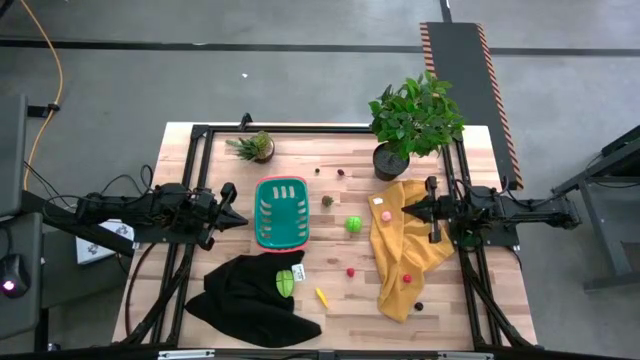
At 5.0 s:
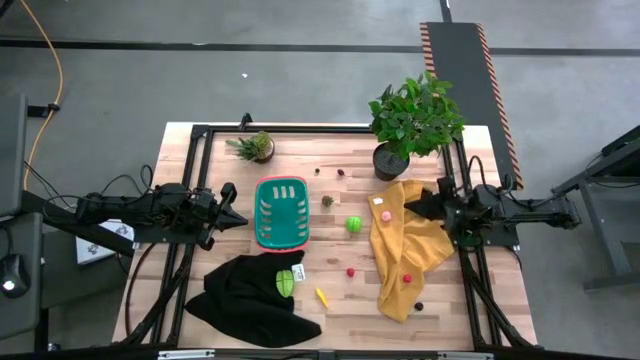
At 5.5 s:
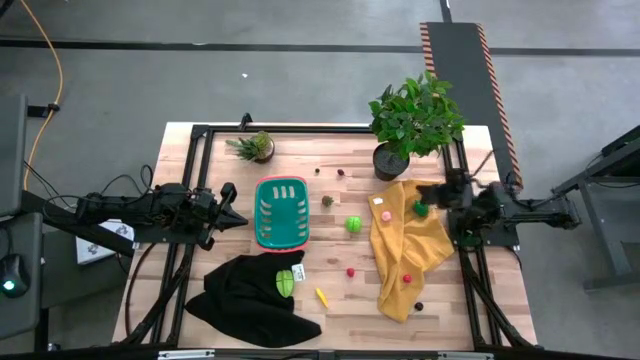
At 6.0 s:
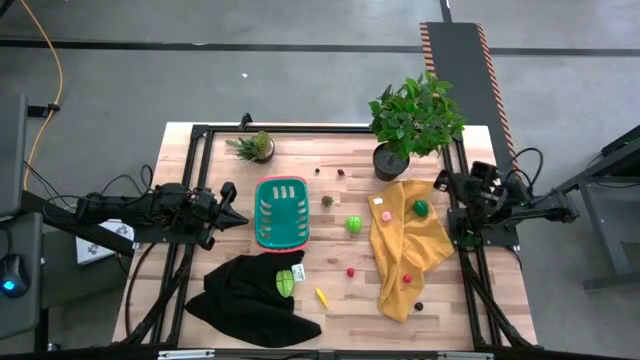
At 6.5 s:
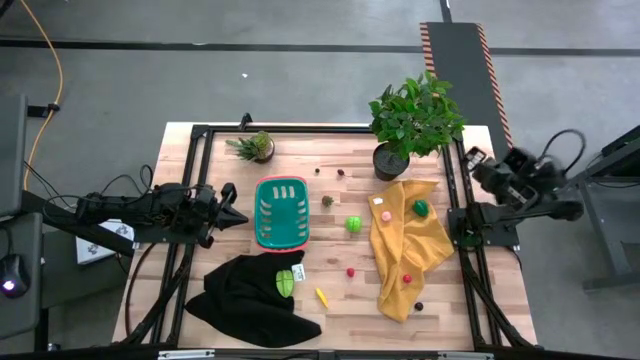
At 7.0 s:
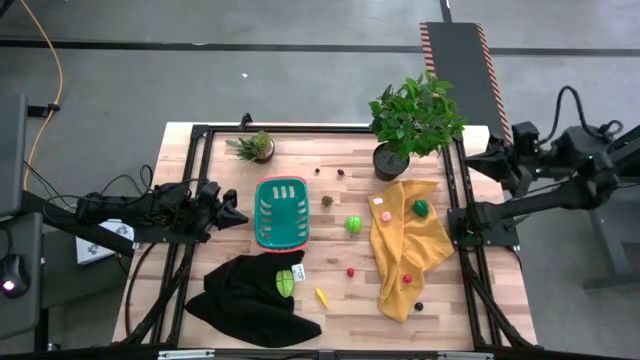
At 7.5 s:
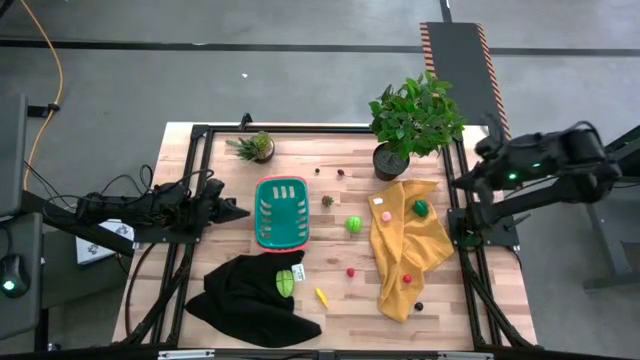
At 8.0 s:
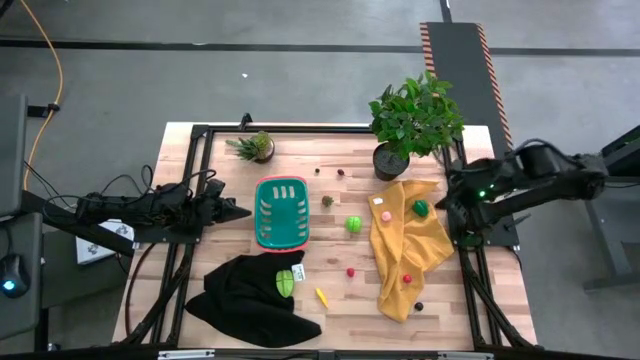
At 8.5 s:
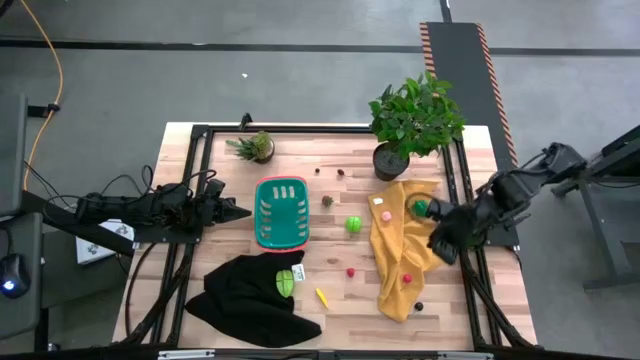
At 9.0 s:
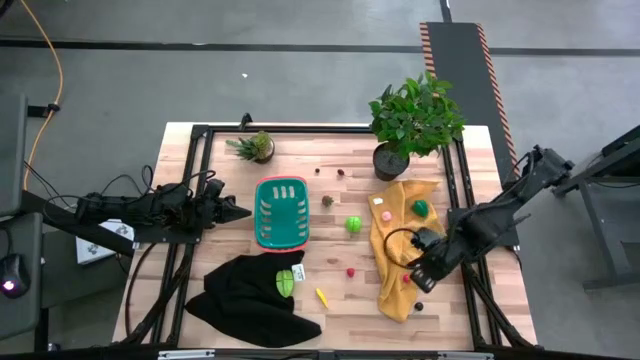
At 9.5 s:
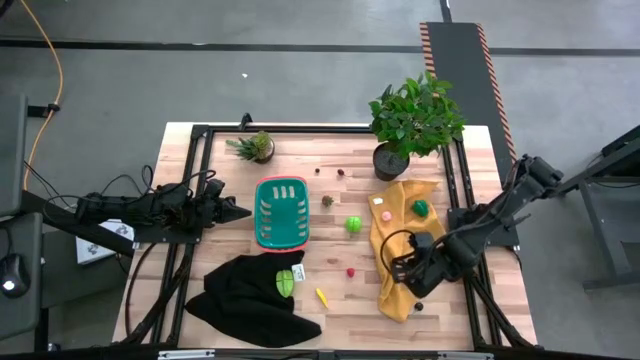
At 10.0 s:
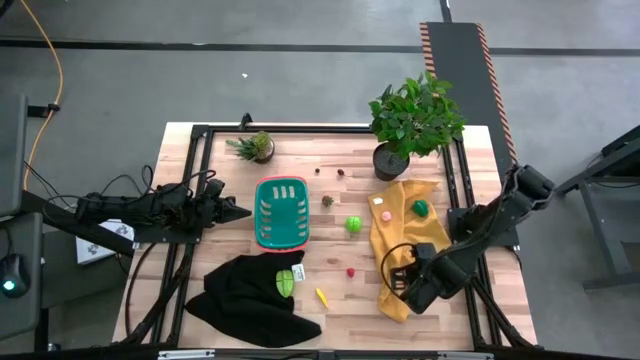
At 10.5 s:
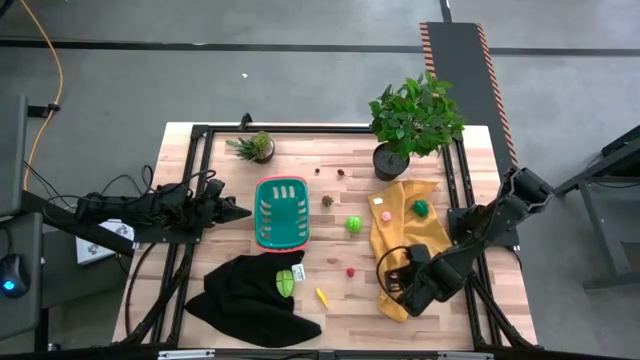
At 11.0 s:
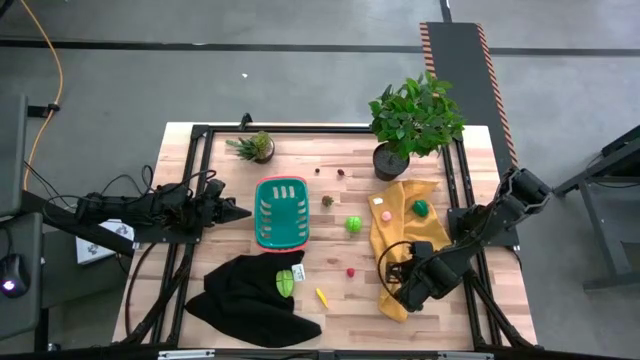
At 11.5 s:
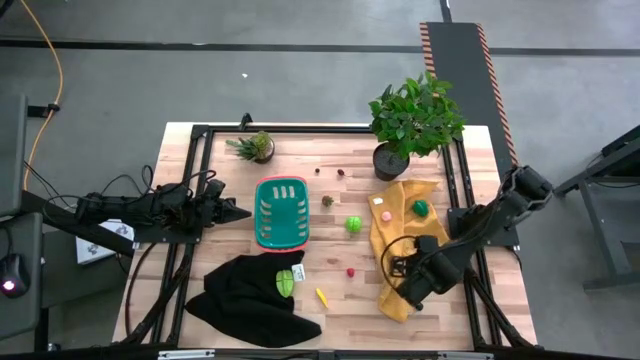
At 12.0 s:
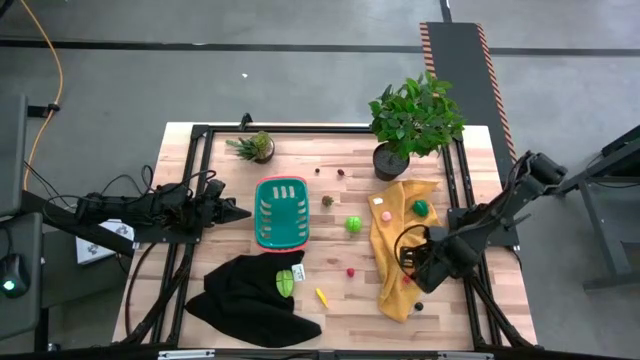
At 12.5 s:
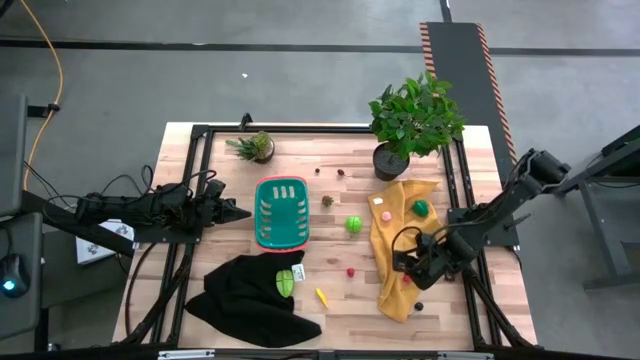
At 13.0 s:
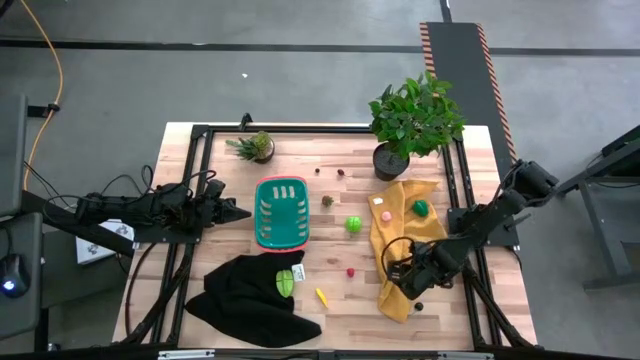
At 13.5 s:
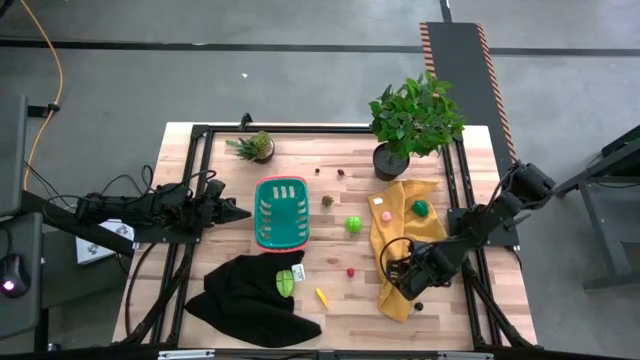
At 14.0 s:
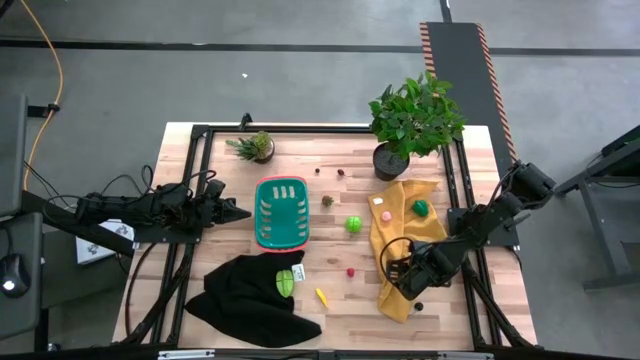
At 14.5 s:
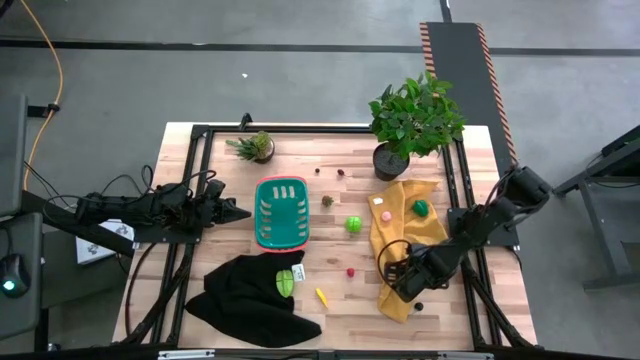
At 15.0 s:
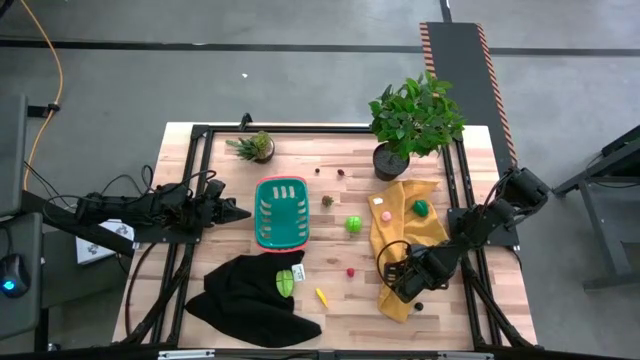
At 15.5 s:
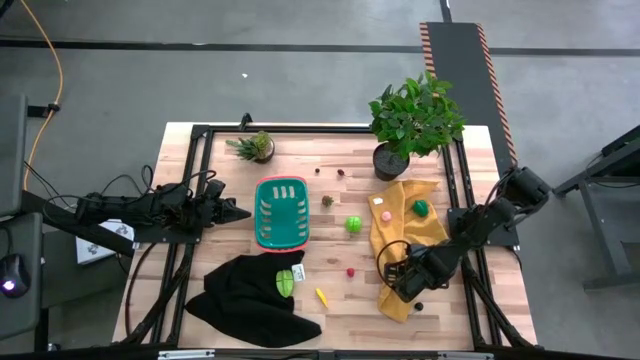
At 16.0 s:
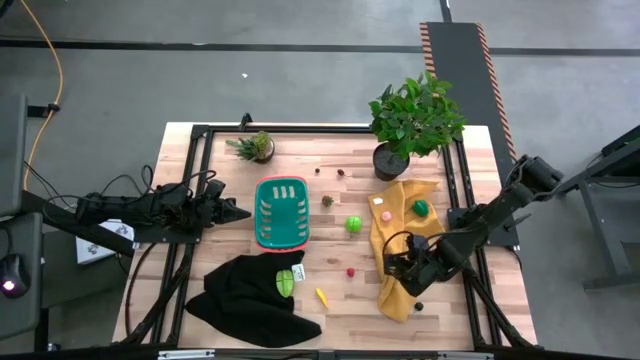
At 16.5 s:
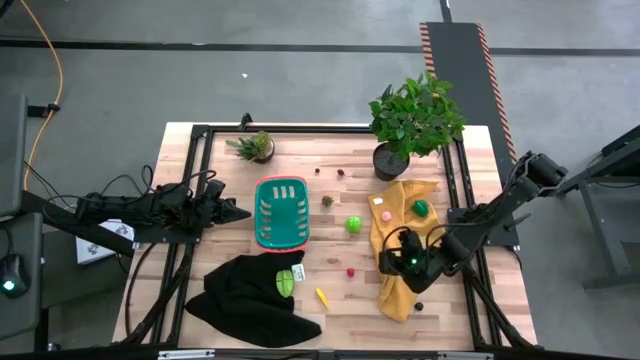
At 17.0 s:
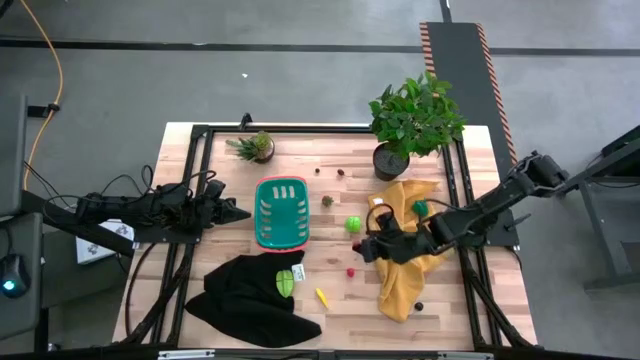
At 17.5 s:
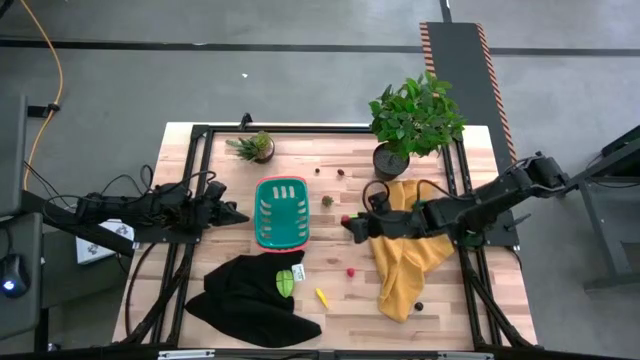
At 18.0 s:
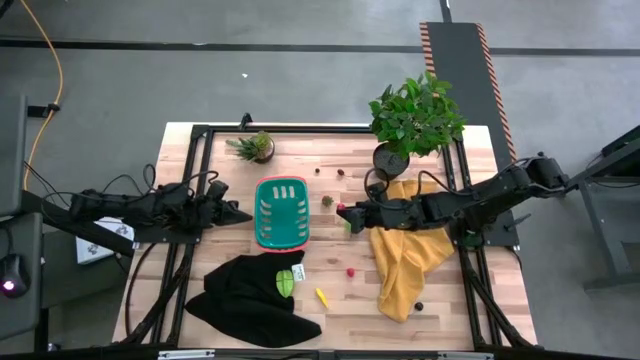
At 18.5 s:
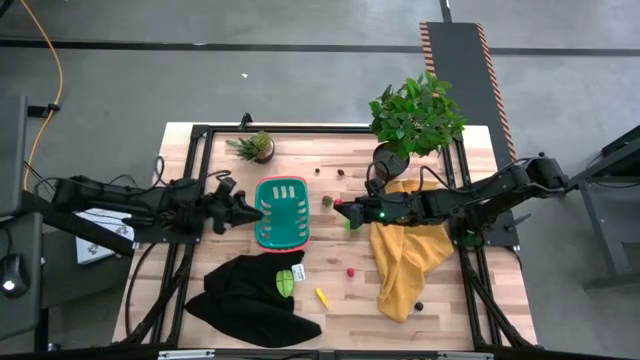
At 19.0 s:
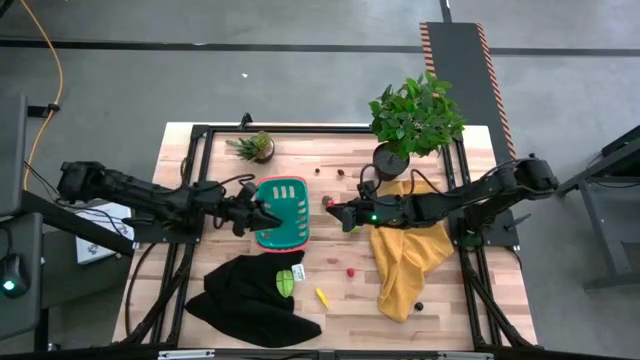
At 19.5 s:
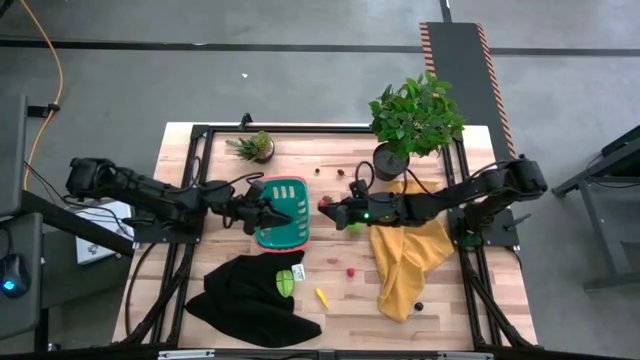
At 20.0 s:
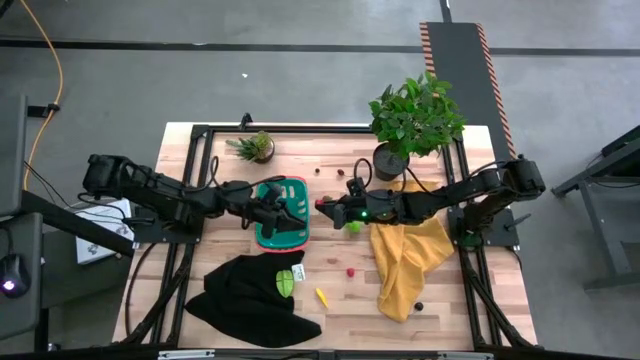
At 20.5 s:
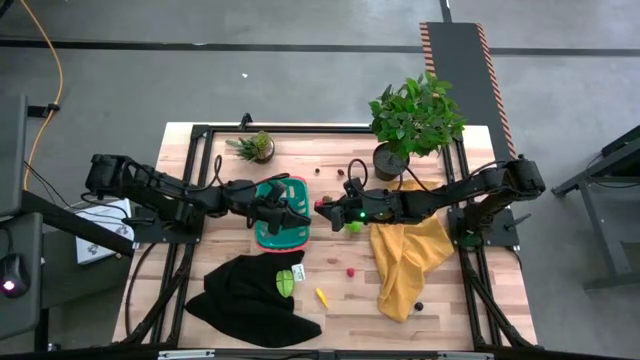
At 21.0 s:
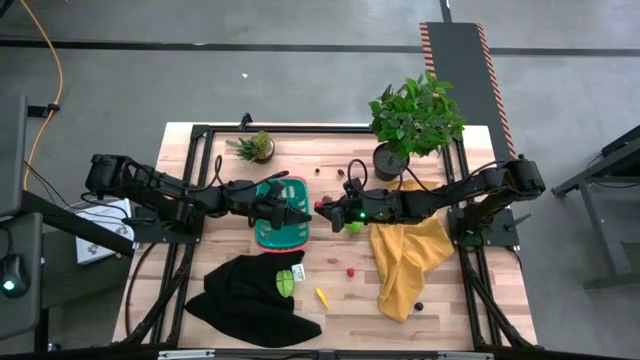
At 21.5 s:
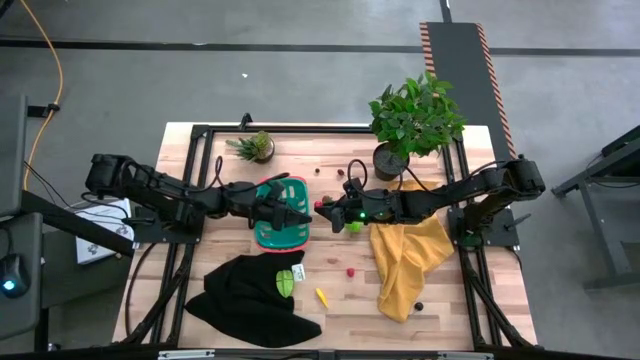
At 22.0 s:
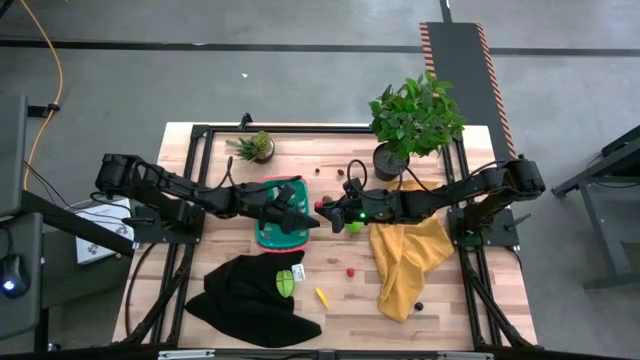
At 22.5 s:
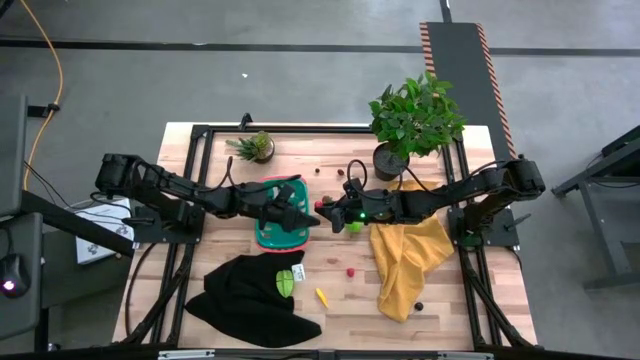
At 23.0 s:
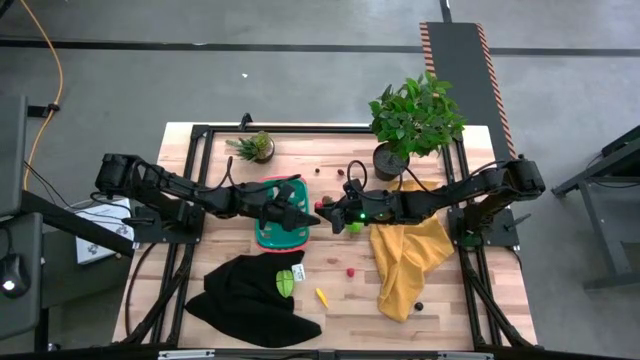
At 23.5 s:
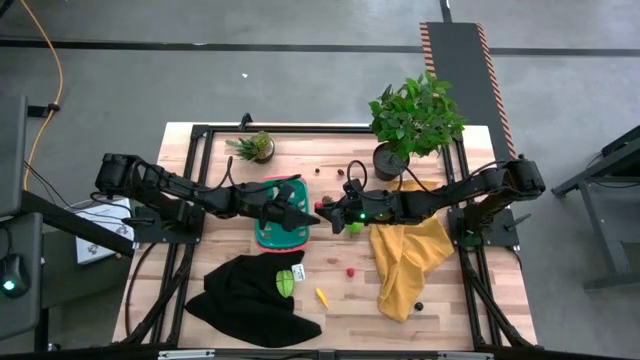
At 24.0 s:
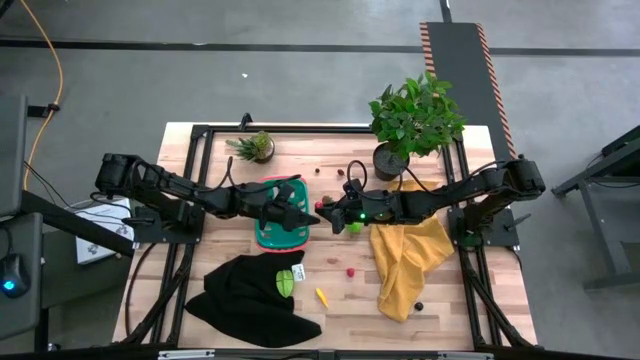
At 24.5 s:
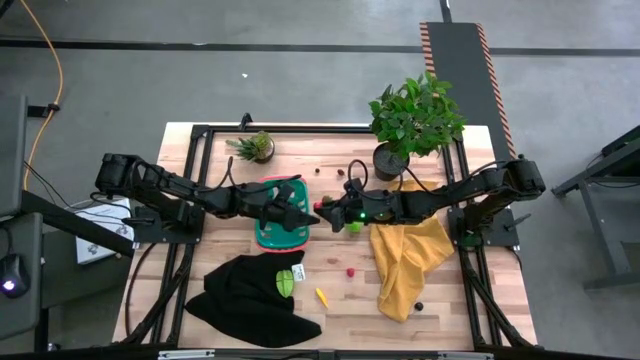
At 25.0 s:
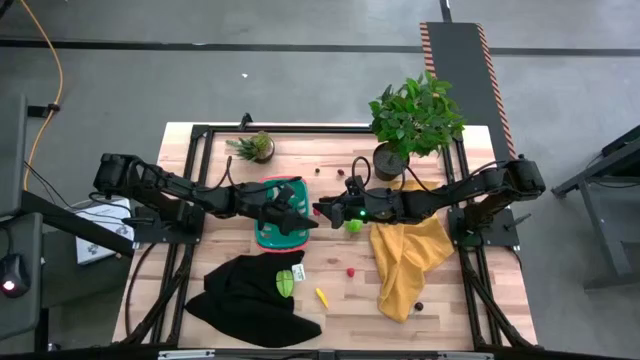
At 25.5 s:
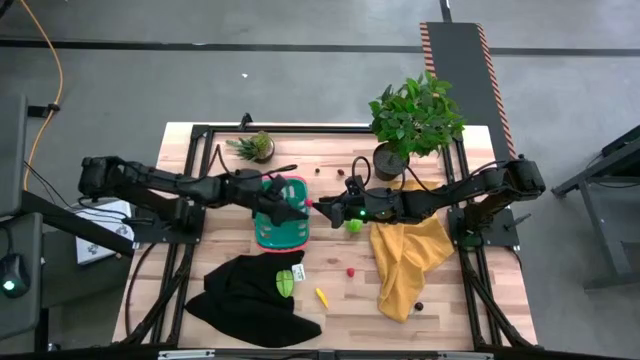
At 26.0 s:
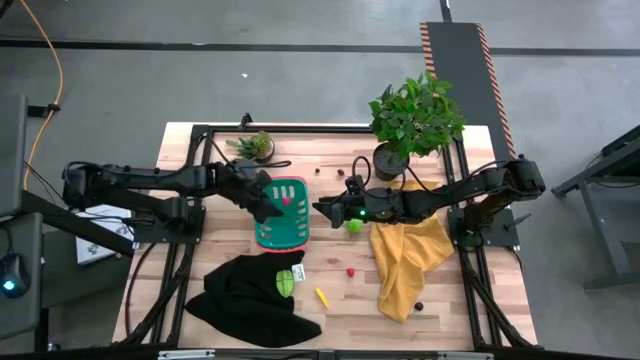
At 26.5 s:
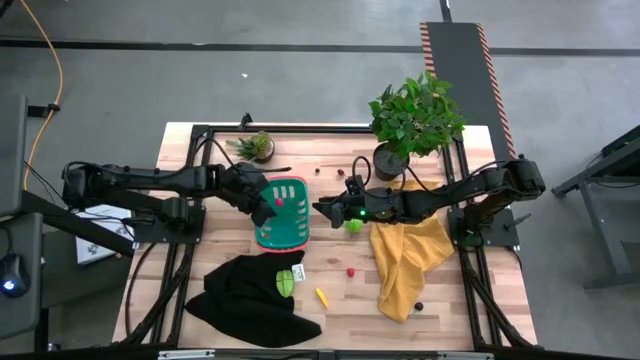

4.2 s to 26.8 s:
Task: Pick and placing Produce into tupperware
Put the bottom red cherry in the green basket
